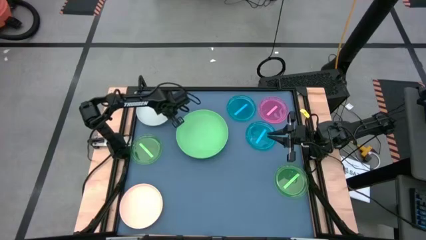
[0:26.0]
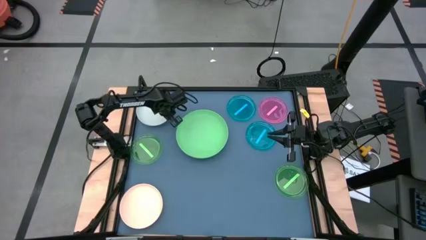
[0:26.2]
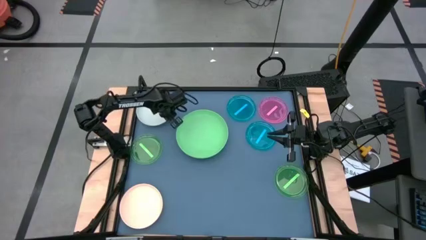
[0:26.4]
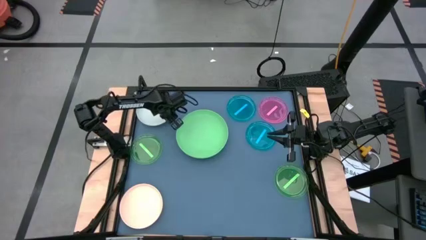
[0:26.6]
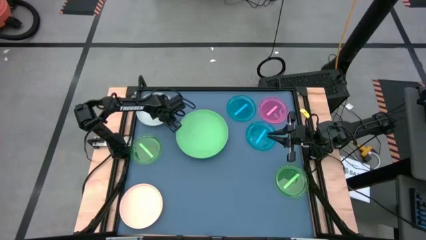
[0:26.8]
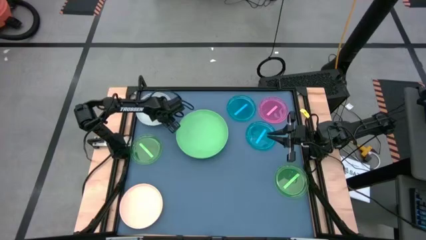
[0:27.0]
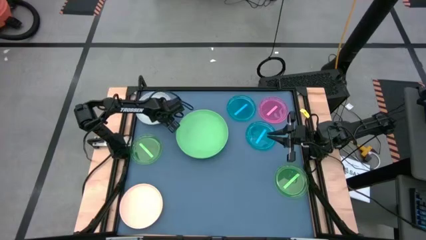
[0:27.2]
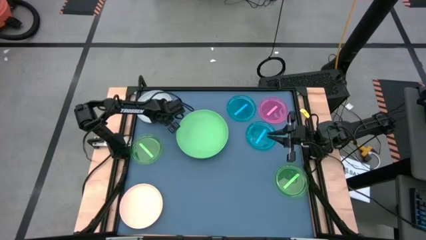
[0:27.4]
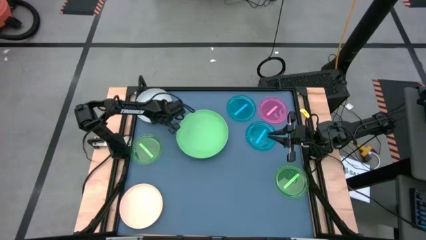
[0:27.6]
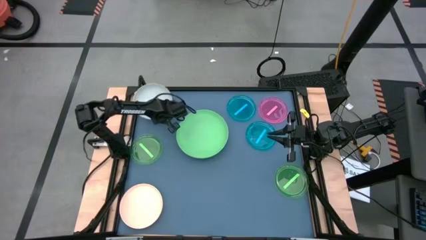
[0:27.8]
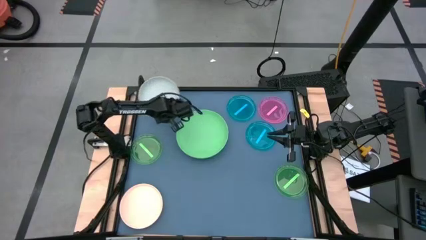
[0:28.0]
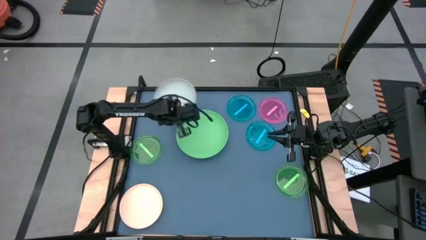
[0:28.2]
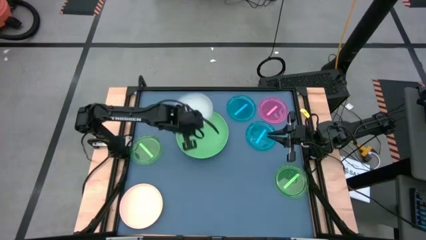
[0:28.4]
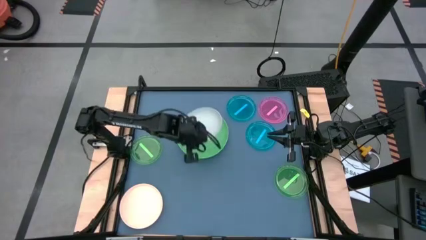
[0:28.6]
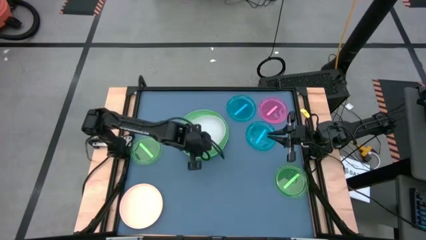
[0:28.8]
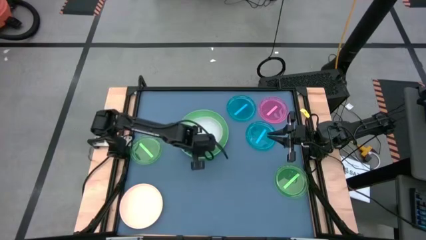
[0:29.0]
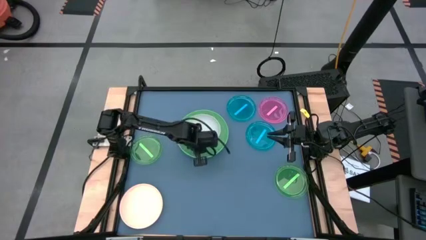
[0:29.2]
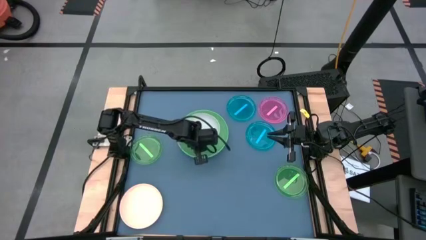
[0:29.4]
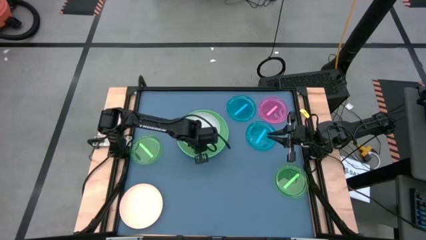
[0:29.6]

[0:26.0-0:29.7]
Task: Stack plastic plates
Stack the white plate on top of the green plate

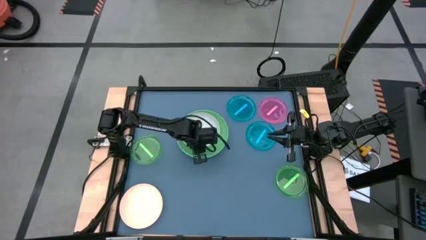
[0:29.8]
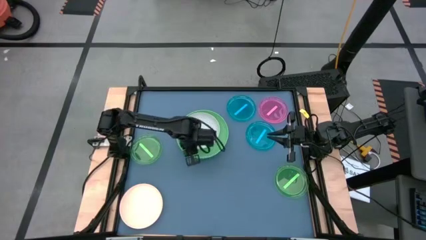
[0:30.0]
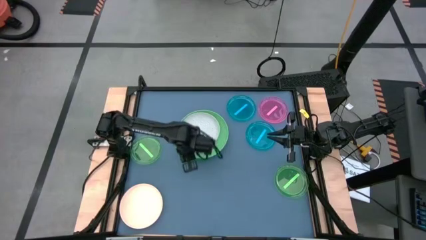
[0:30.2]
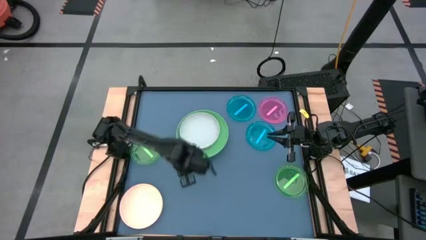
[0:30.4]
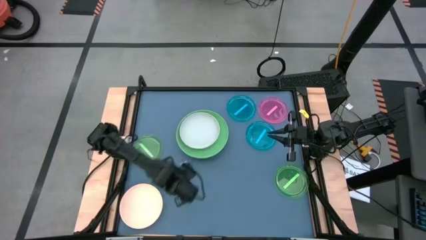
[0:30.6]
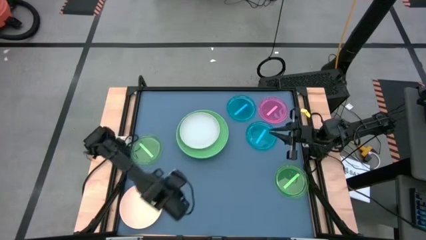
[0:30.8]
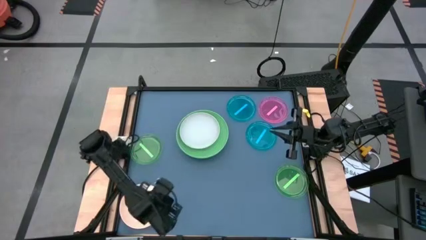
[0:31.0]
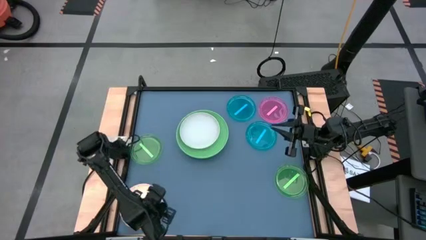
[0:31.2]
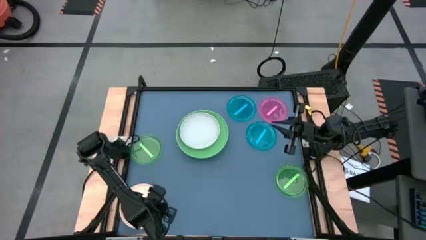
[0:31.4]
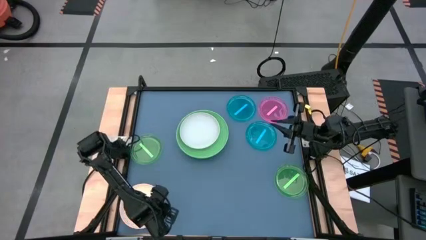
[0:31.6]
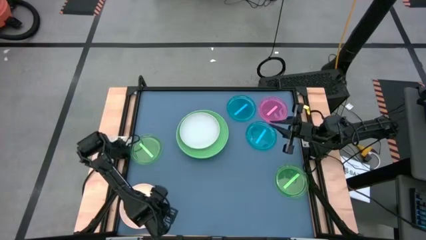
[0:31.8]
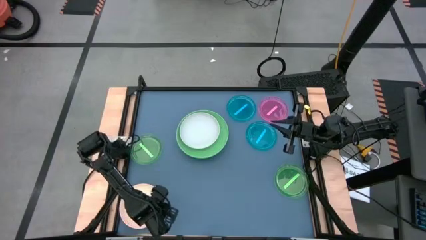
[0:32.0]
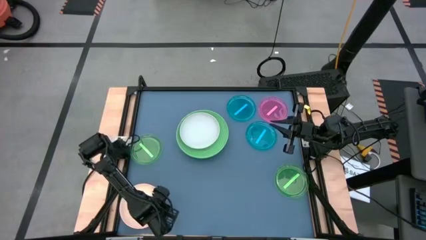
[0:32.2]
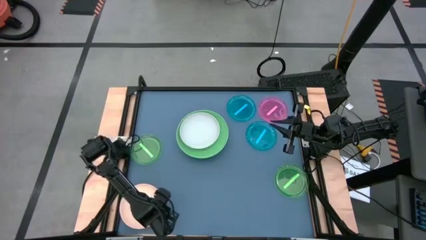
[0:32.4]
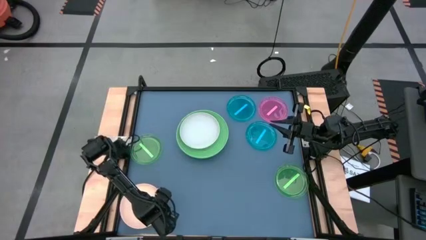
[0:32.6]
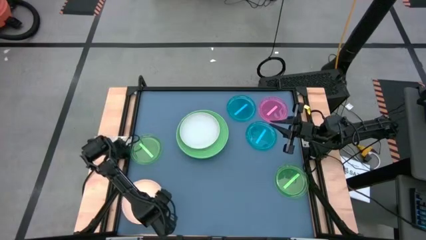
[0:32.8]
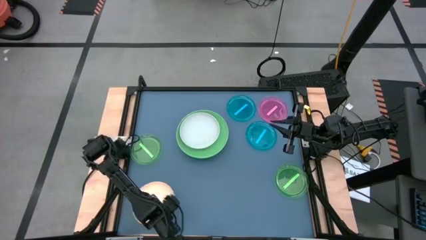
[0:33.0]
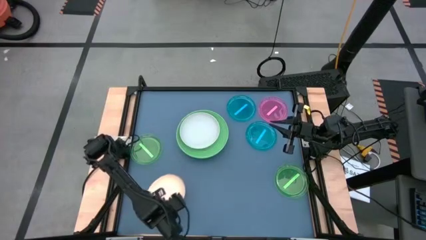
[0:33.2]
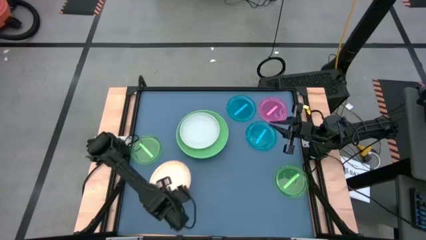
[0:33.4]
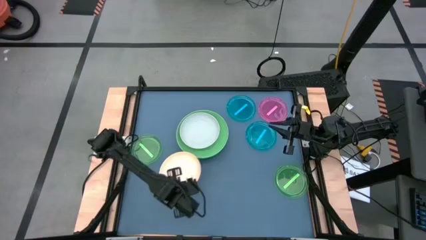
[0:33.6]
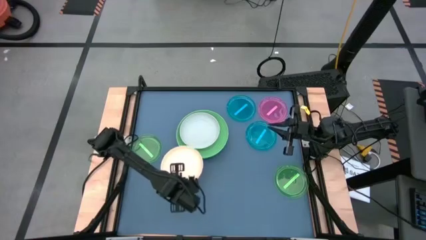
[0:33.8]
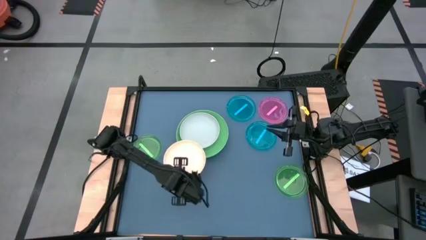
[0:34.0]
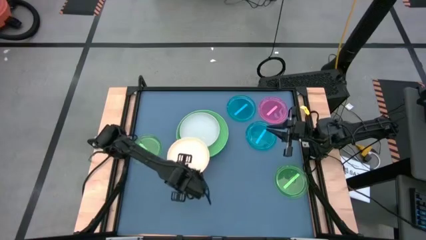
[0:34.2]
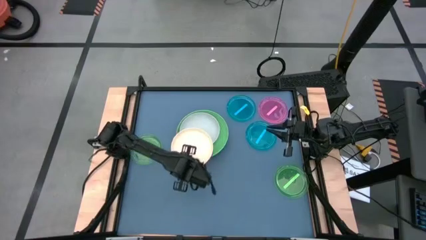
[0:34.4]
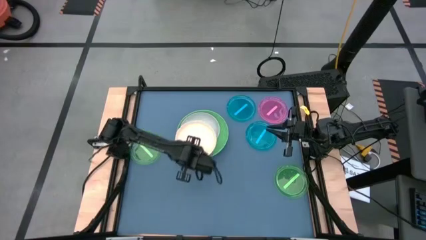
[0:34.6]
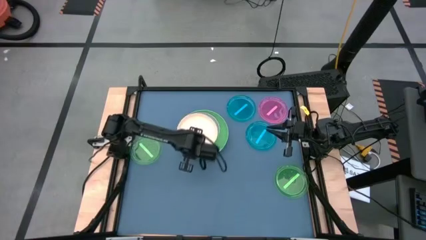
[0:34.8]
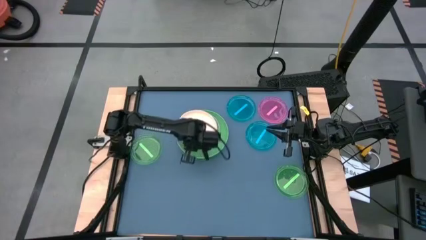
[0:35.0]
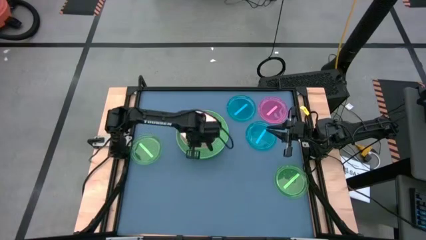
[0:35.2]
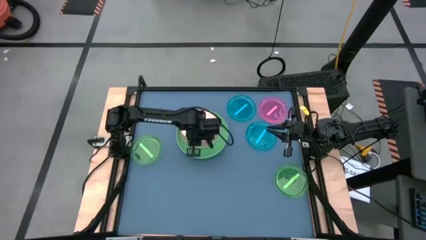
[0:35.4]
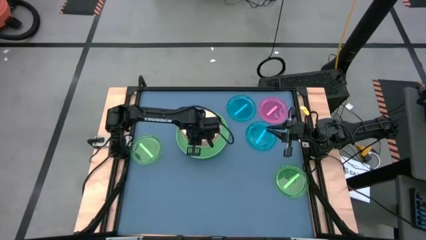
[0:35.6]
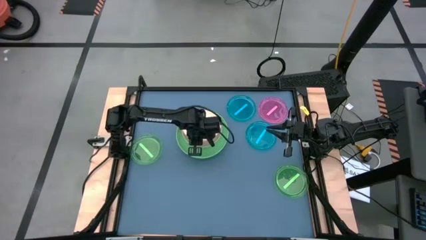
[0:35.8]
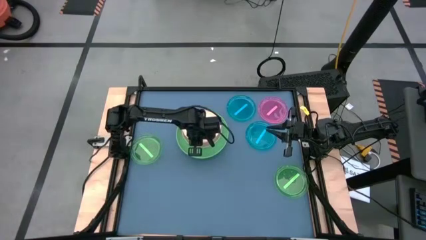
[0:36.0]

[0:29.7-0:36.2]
Stack the orange plate on top of the white plate

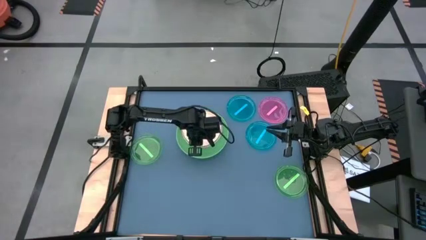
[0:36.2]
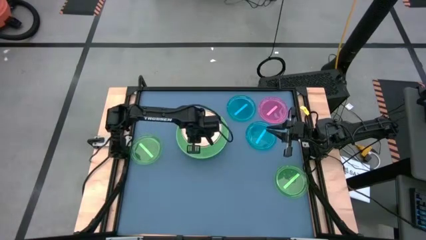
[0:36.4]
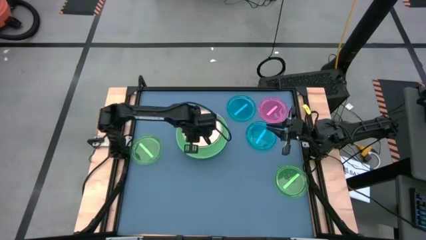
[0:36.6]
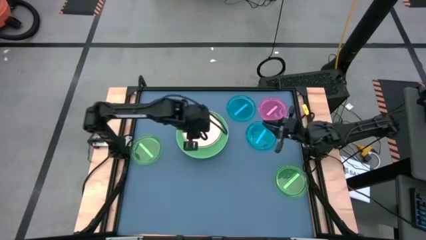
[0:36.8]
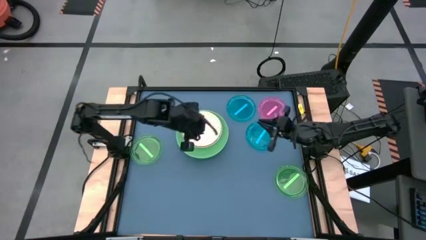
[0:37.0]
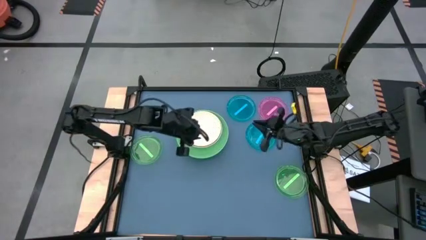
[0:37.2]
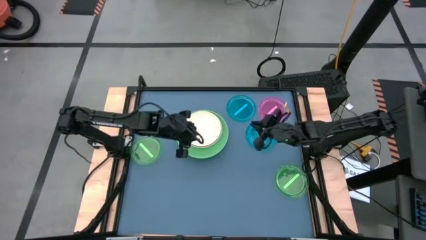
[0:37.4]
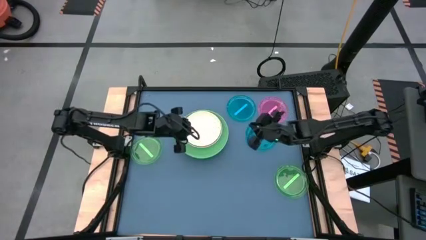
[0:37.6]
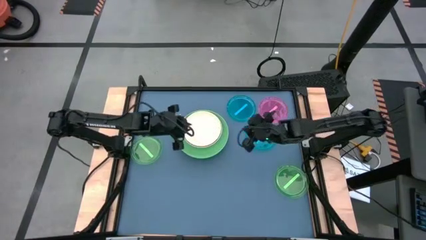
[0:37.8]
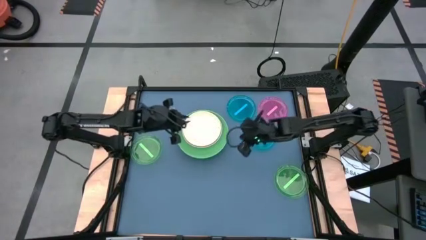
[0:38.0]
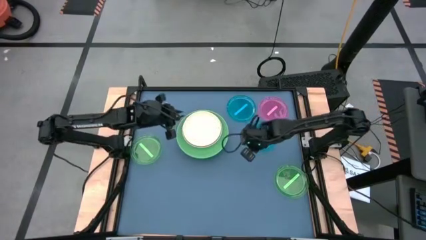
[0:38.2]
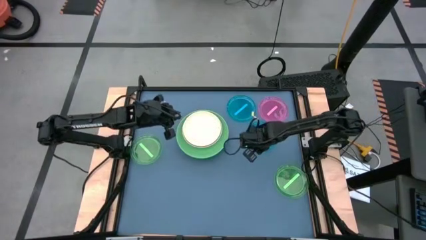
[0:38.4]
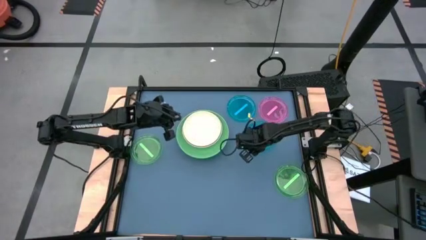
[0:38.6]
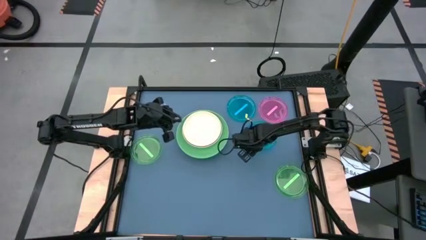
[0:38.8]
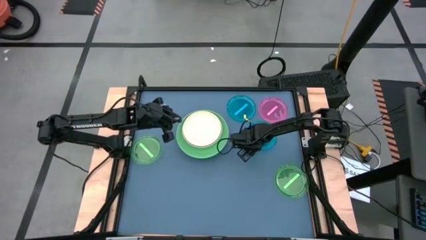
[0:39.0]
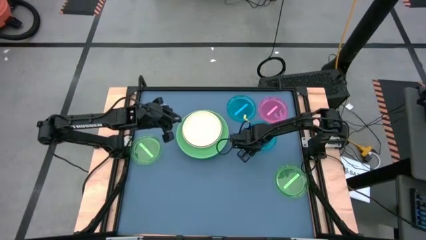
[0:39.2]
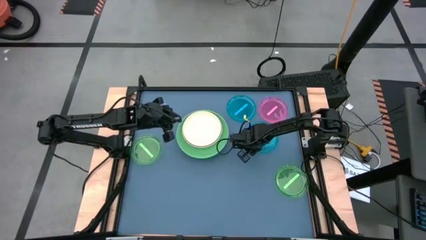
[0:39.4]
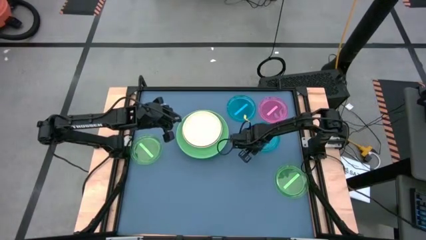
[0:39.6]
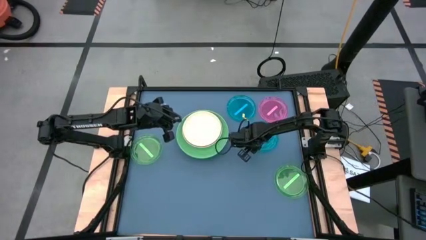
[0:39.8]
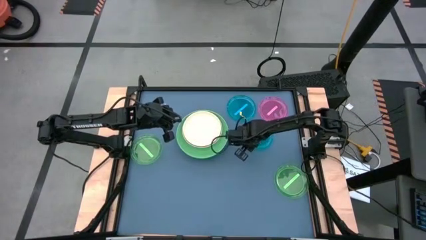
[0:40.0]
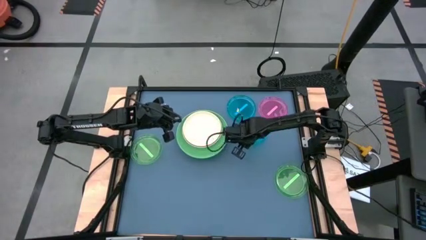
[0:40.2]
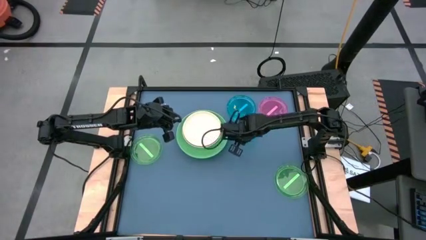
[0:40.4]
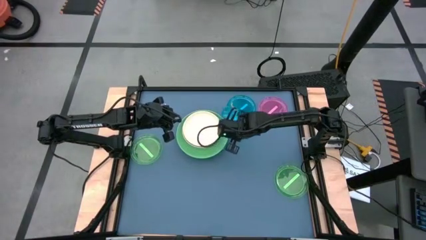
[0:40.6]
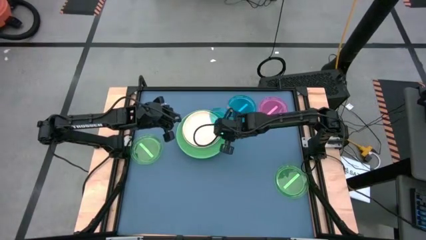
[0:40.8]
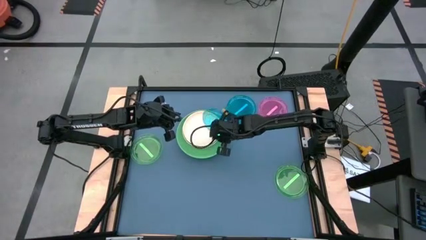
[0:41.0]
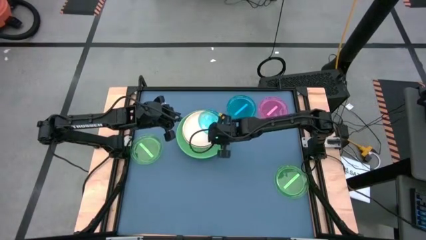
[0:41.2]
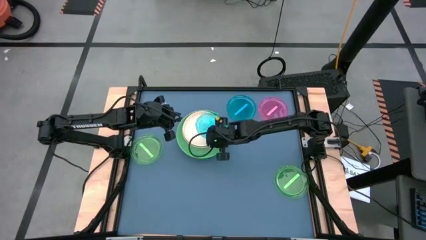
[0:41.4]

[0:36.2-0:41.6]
Stack the bottom blue plate on top of the orange plate
